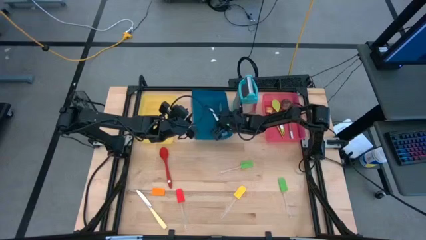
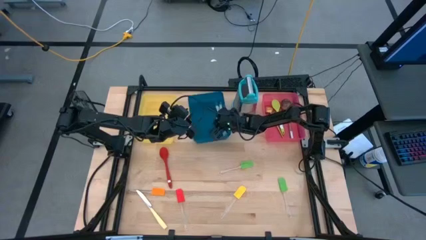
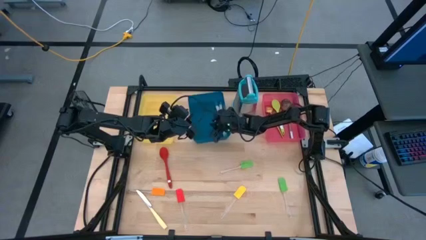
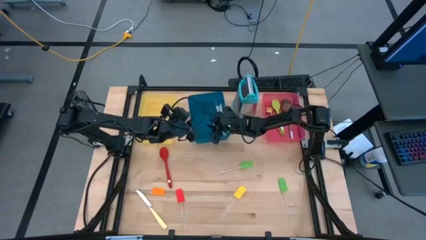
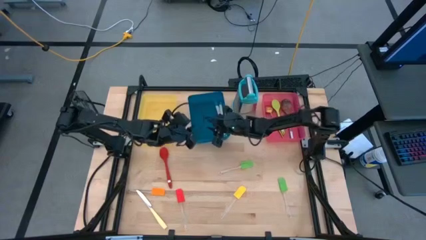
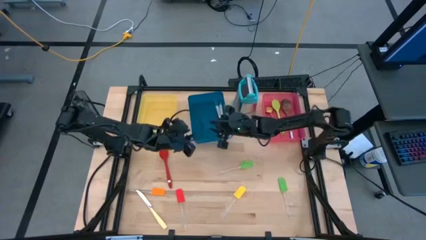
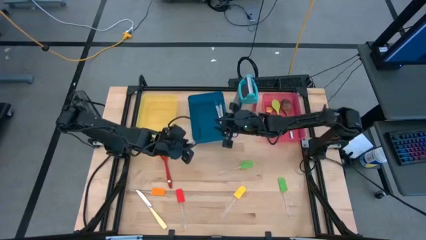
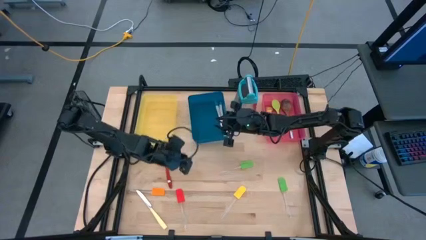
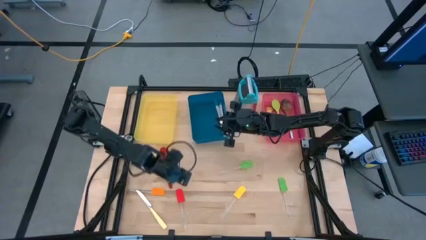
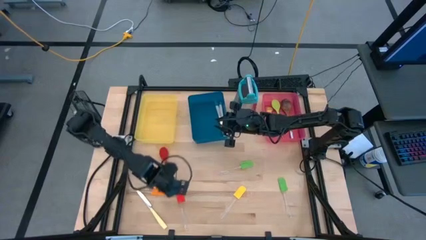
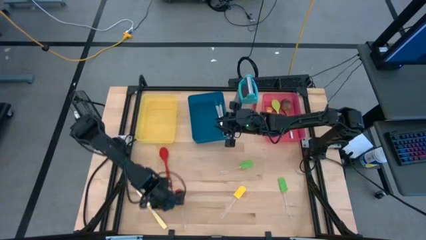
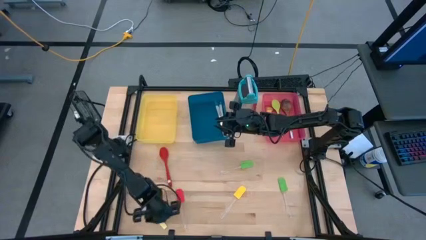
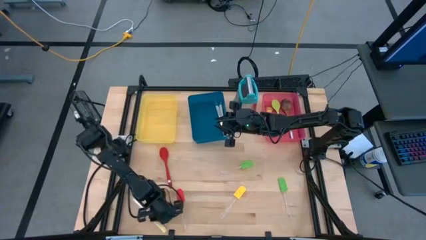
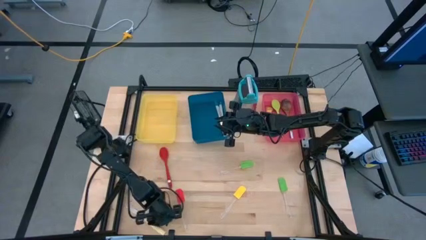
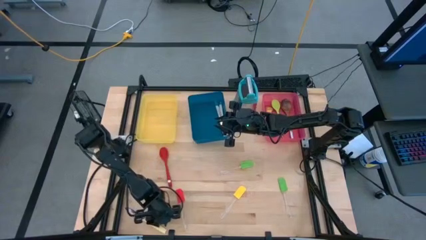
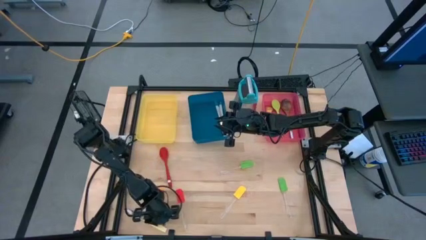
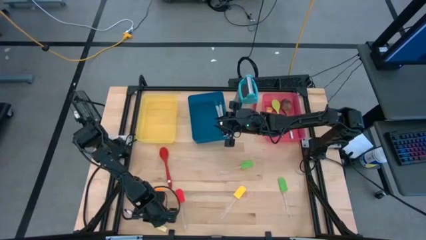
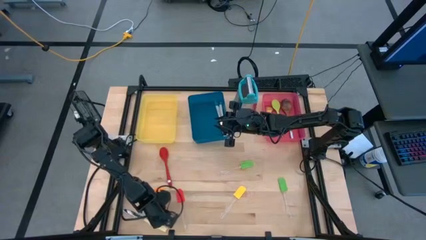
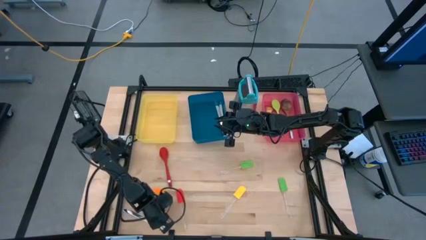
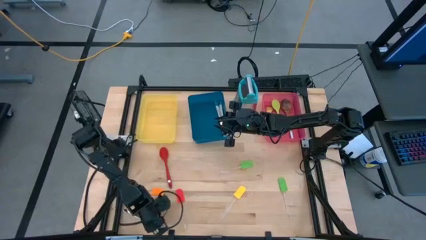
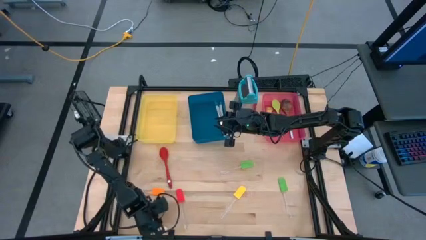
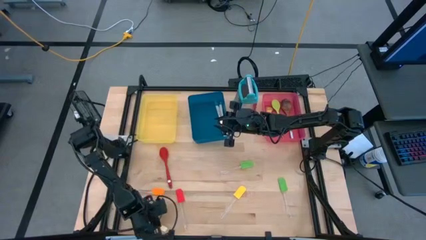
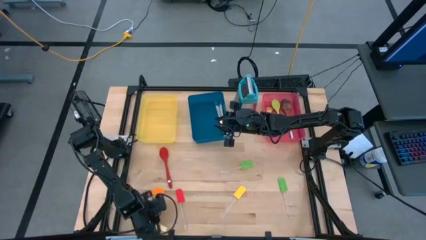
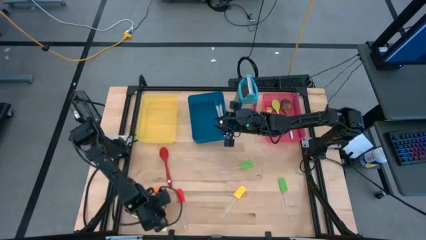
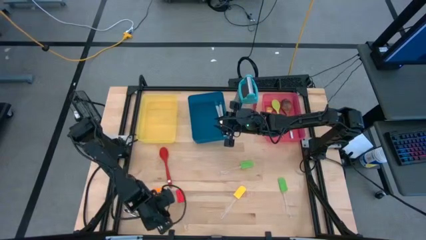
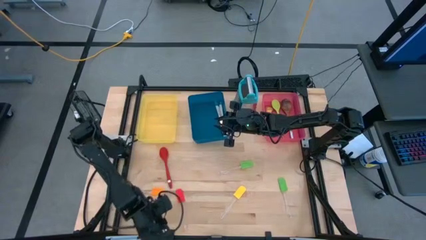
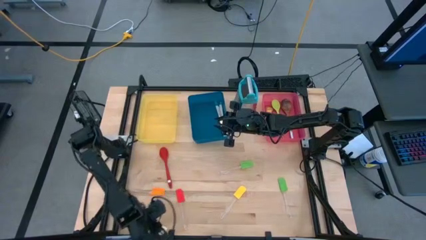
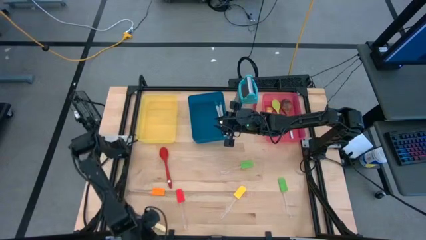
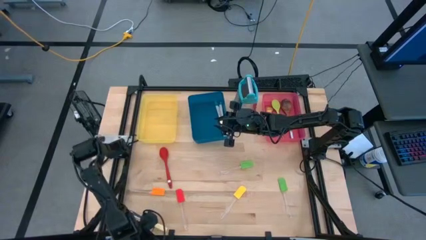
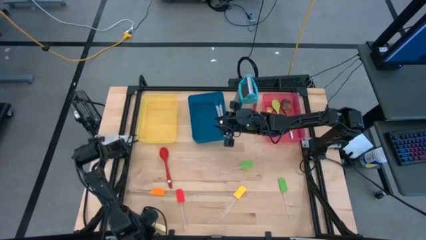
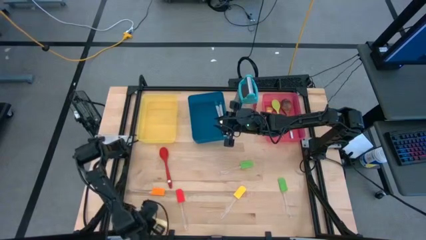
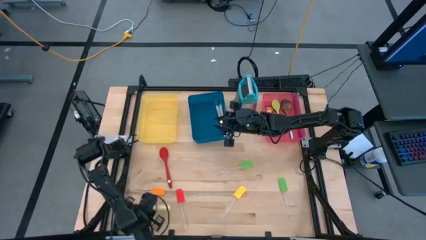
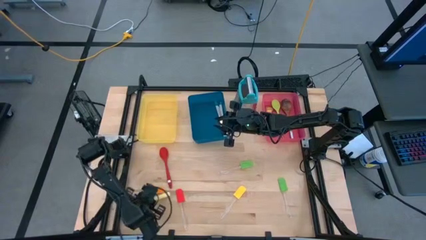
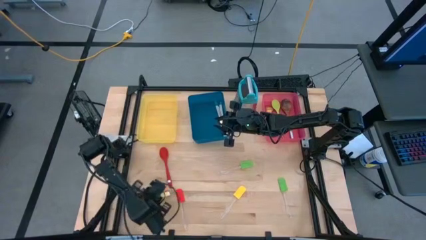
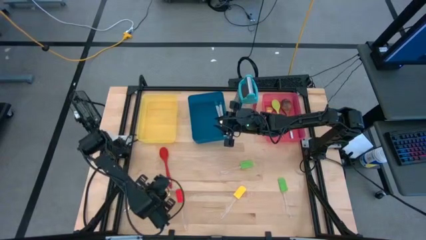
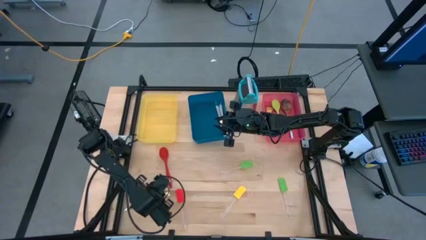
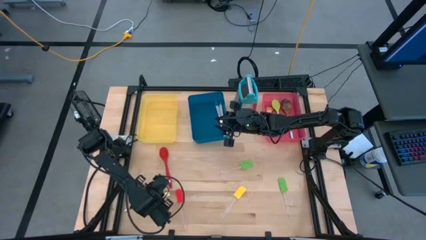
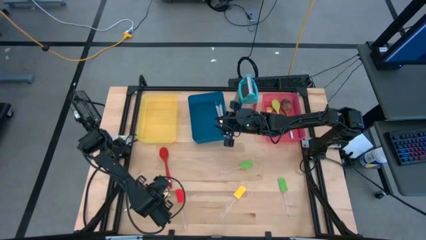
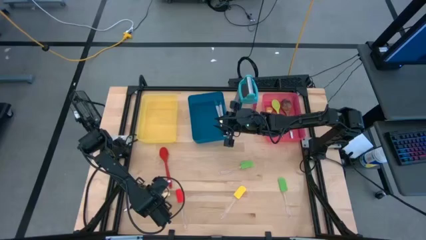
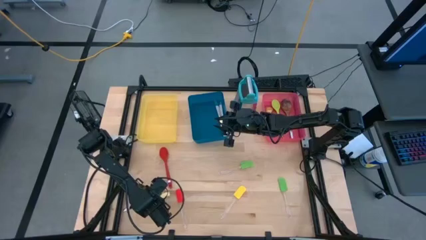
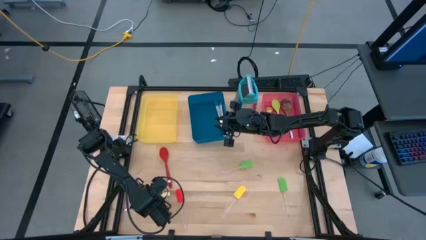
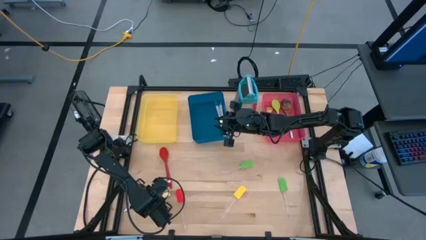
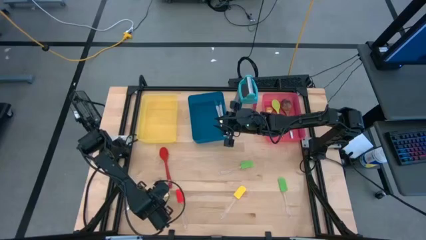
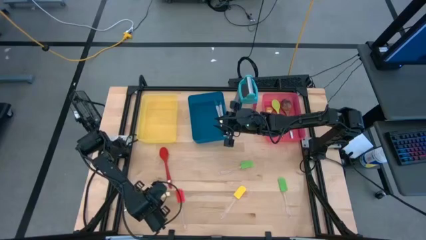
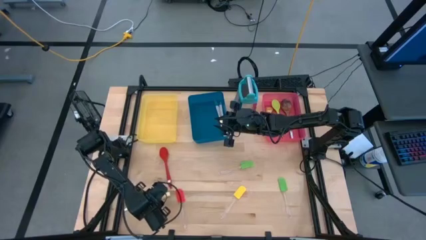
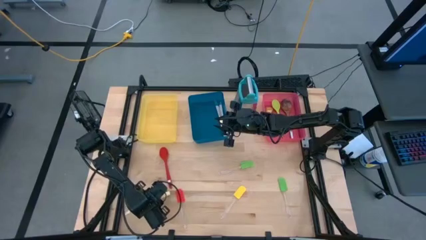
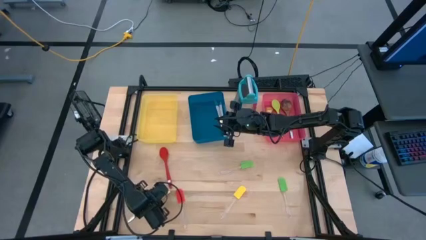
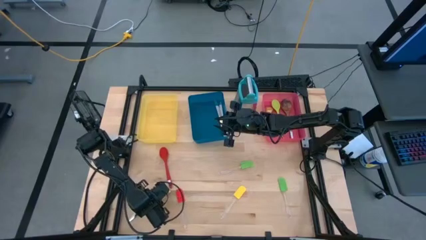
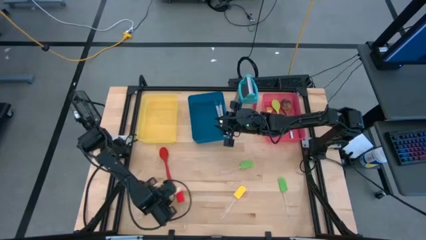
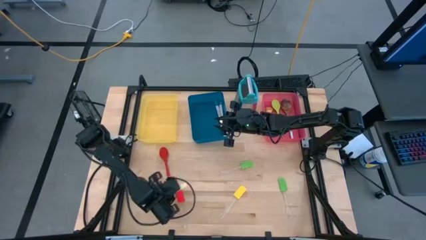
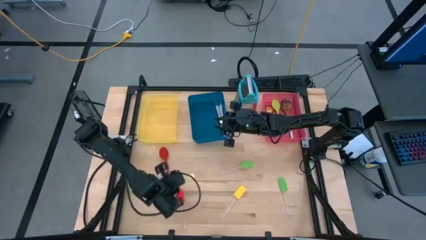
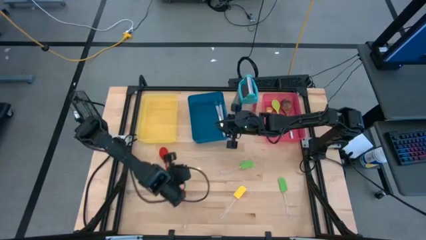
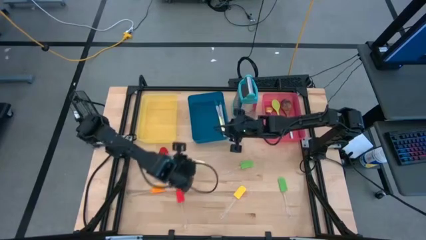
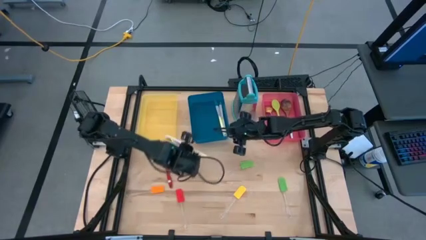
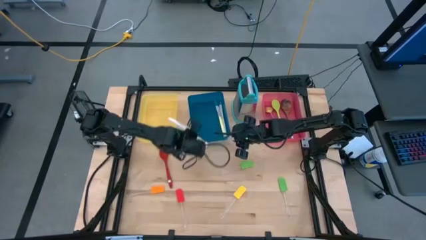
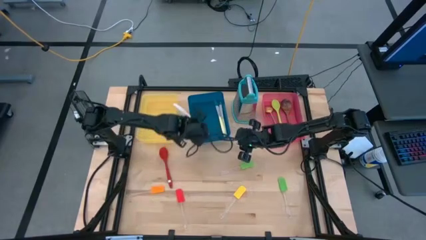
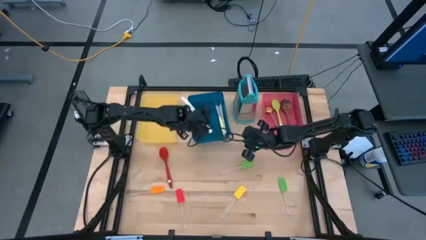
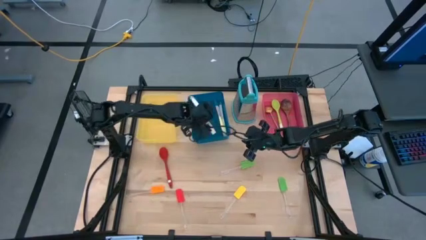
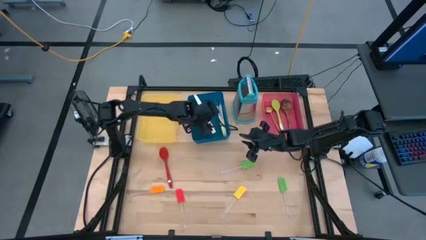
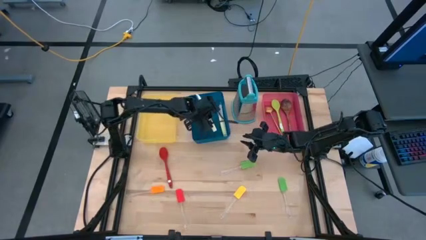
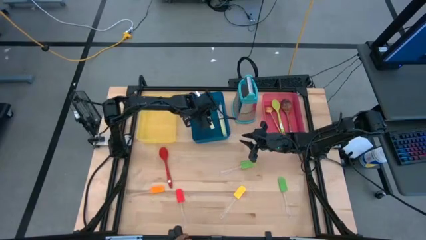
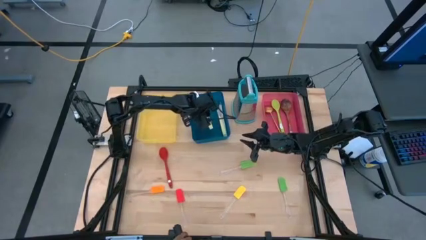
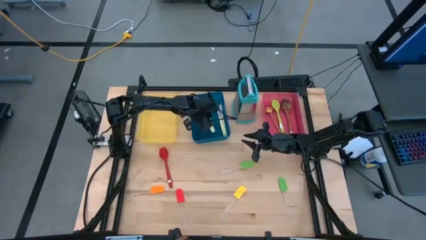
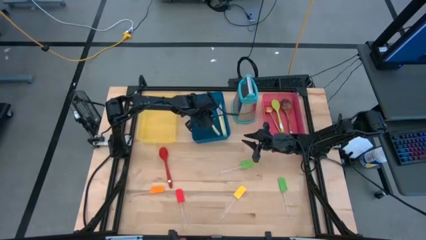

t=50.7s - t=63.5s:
Task: Pick & Place Kitchen Items
Put the yellow knife into the blue bin

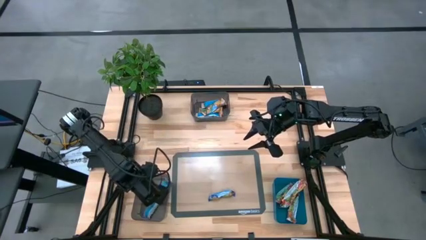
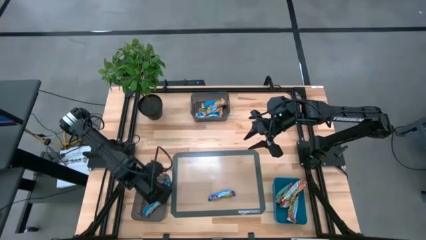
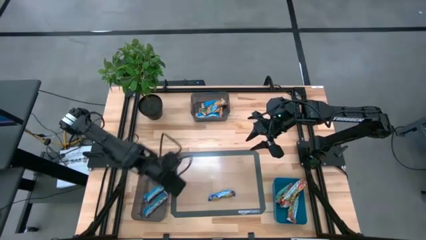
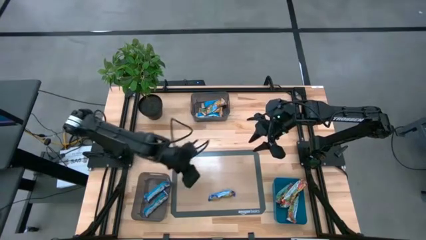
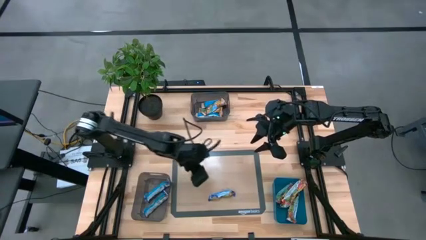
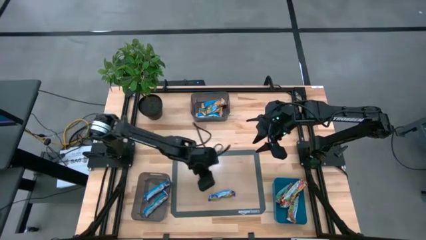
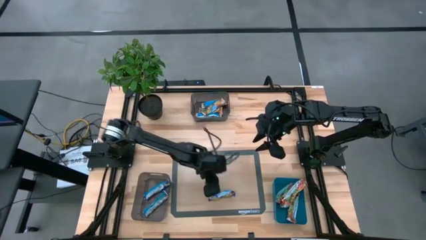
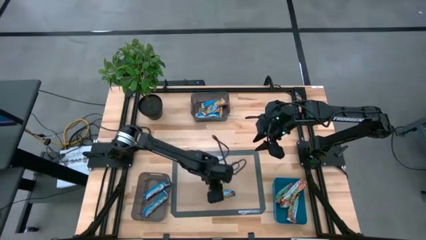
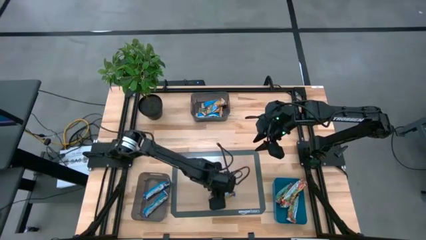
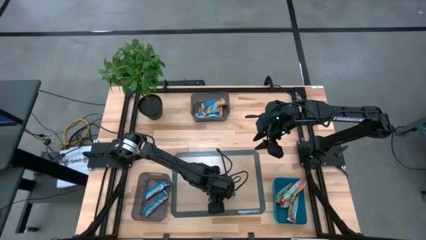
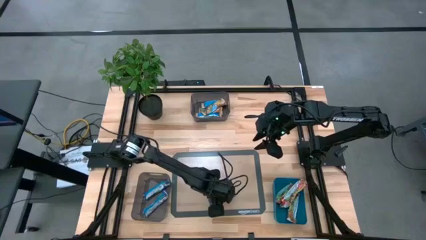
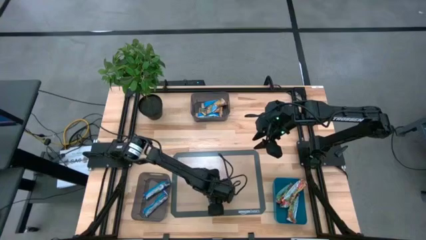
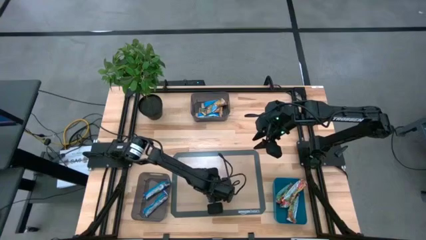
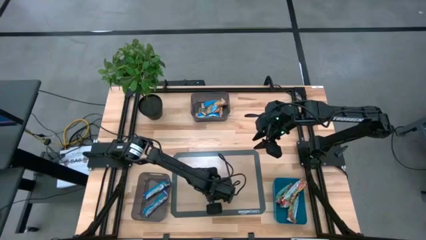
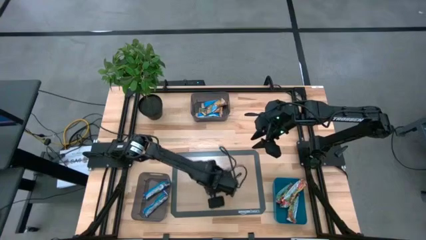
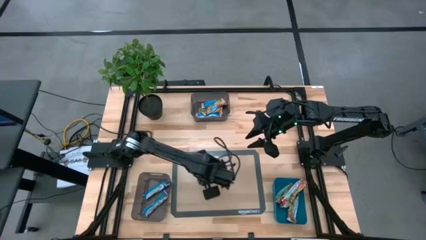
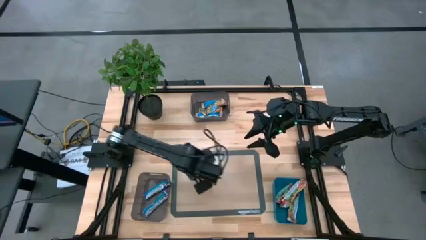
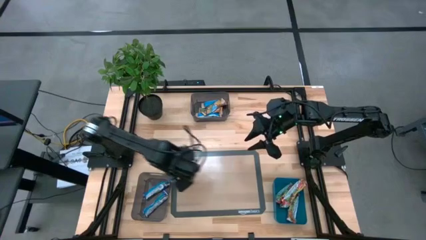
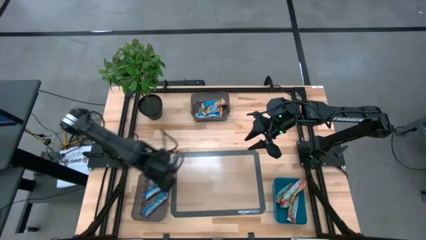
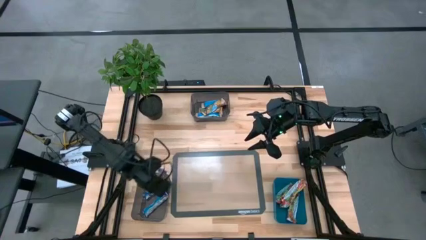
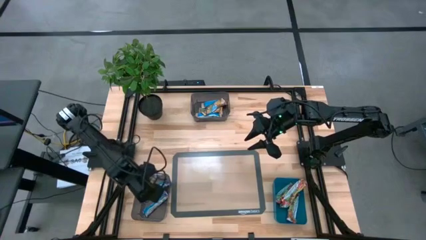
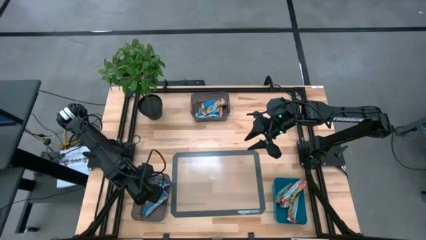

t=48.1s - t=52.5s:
Task: Pick and place Granola Bars by type
Put the blue granola bar into the bottom black transparent bin
